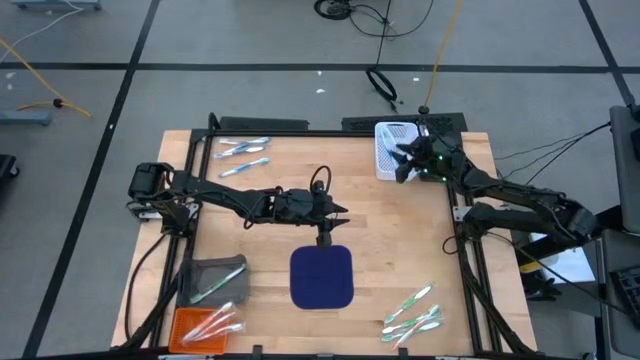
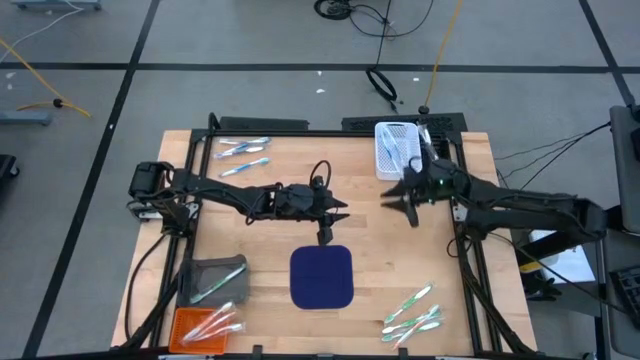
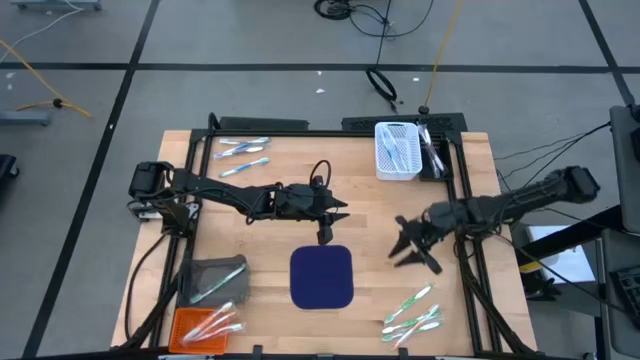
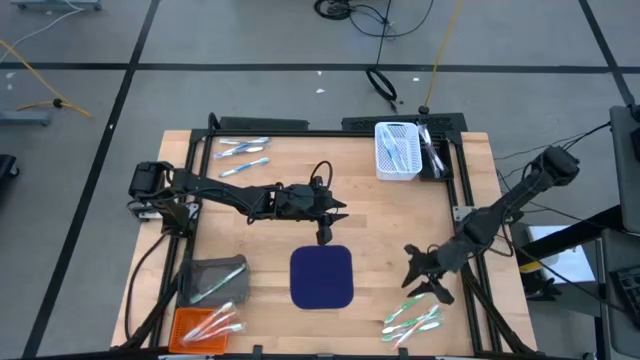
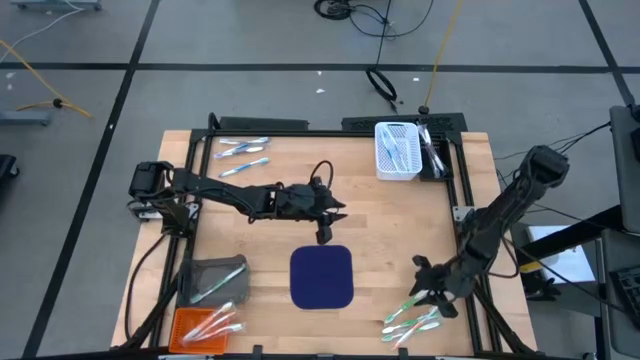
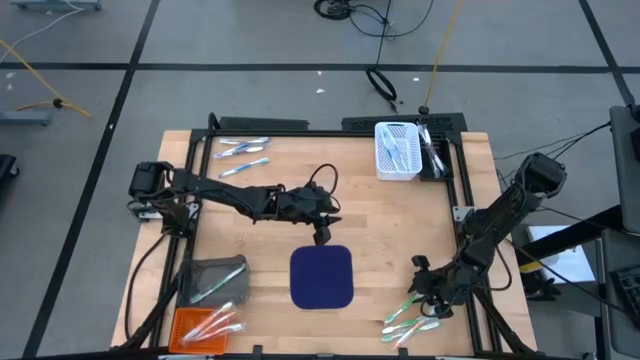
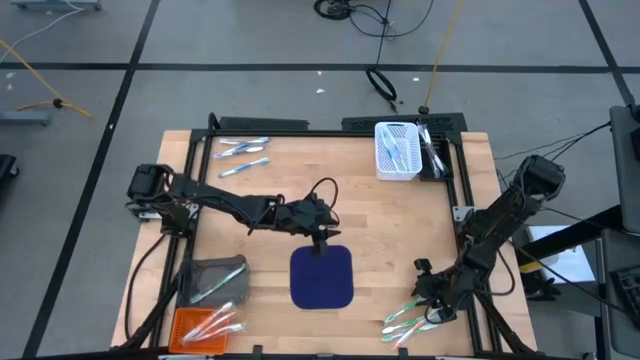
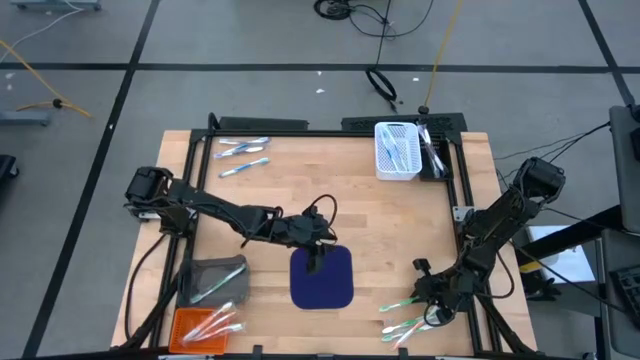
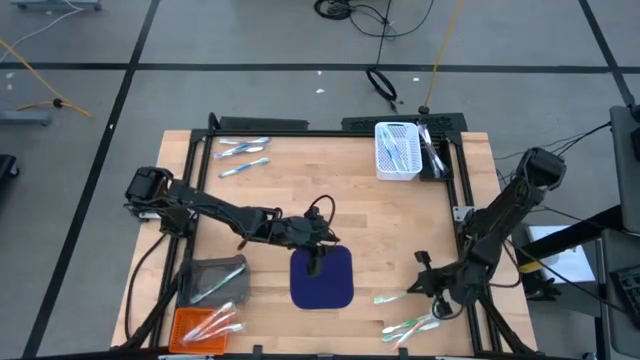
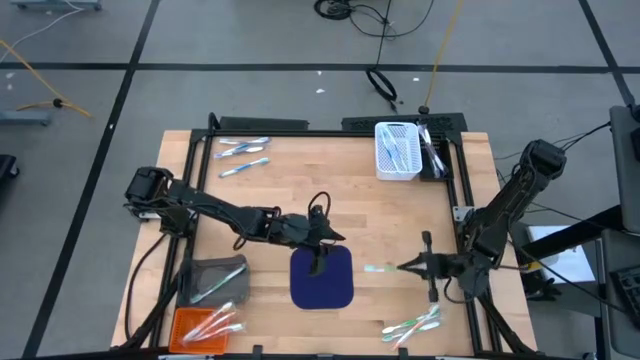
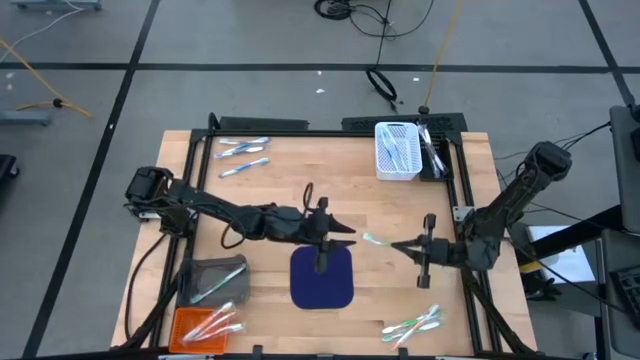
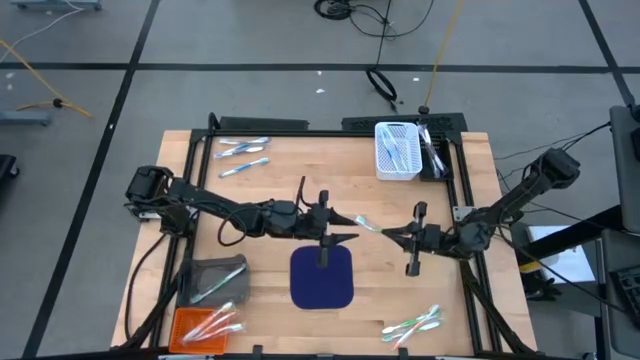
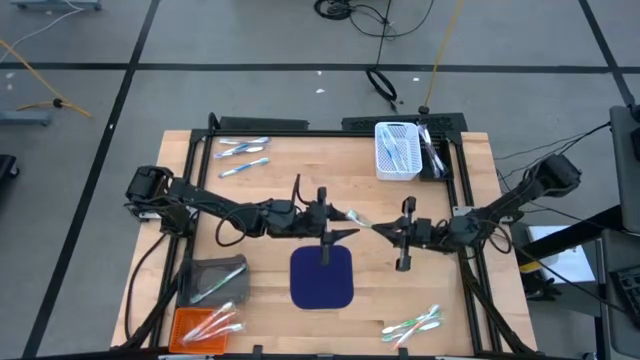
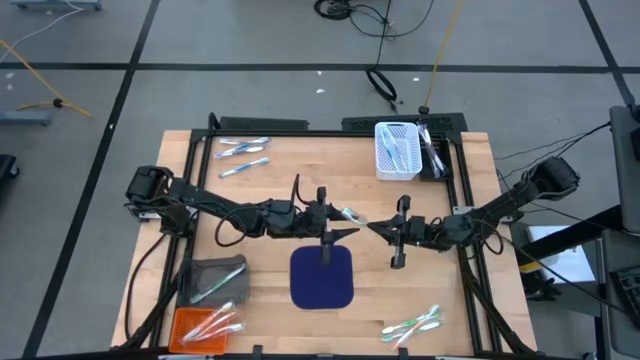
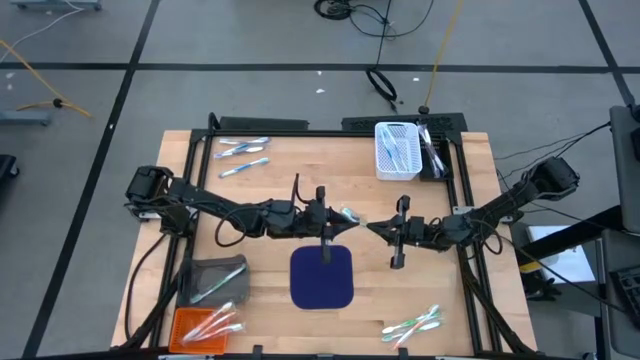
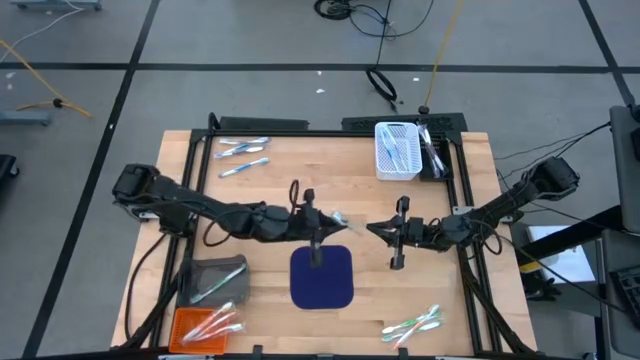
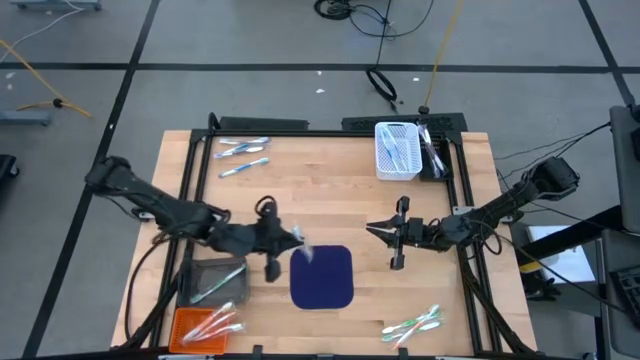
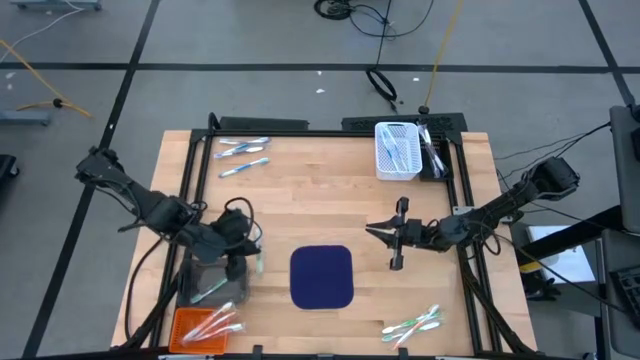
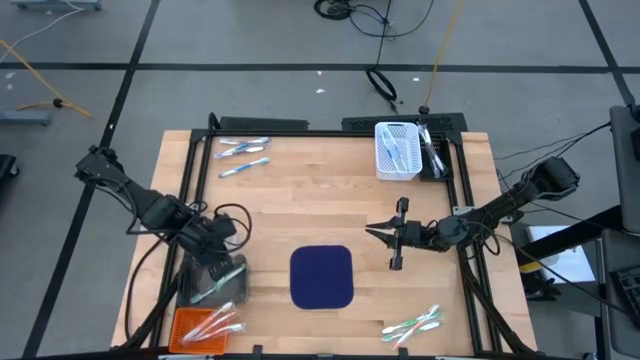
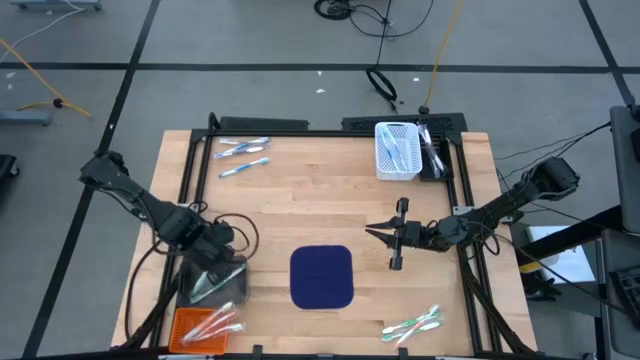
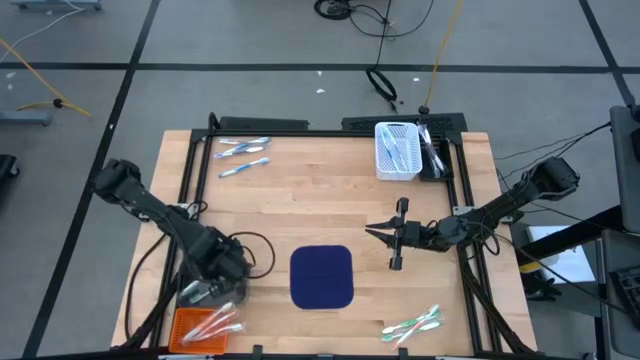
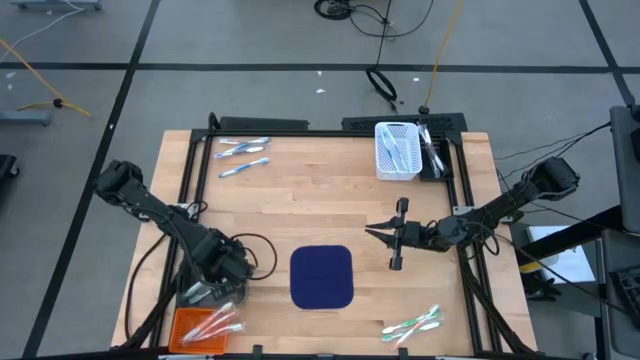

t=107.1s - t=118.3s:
Task: Pick & Place Toothbrushes
Put the green toothbrush into the black bin

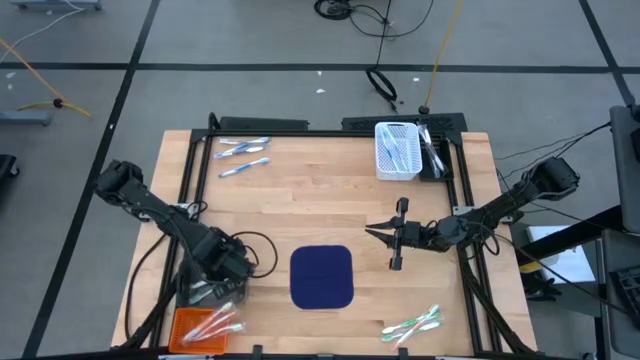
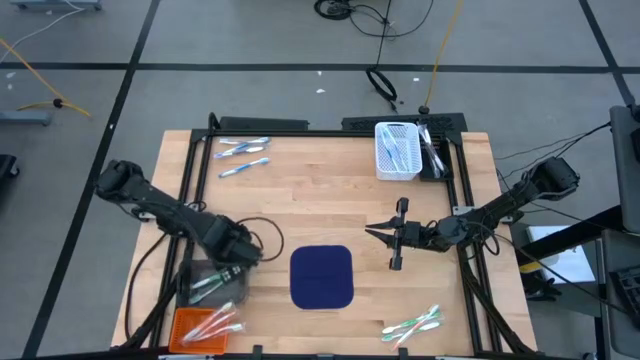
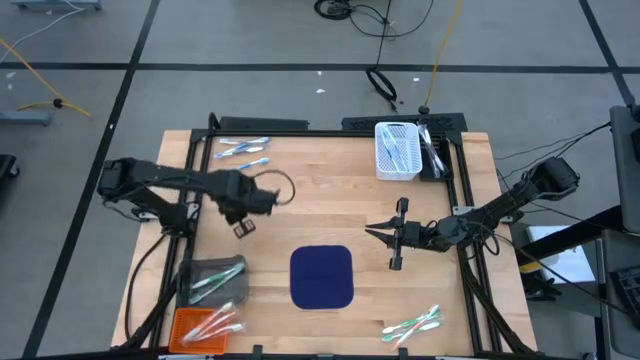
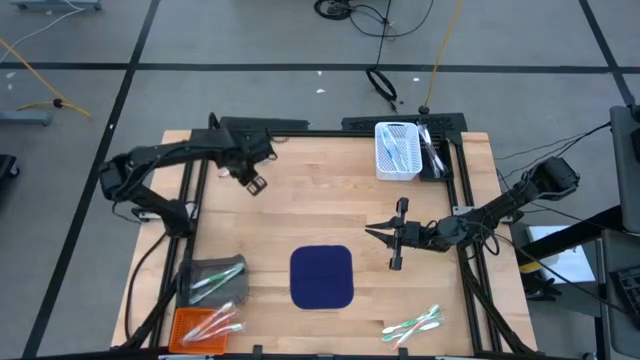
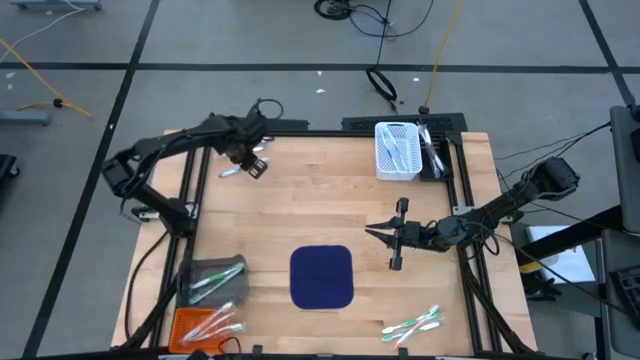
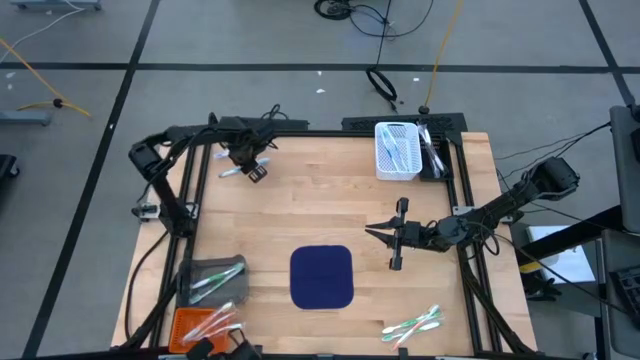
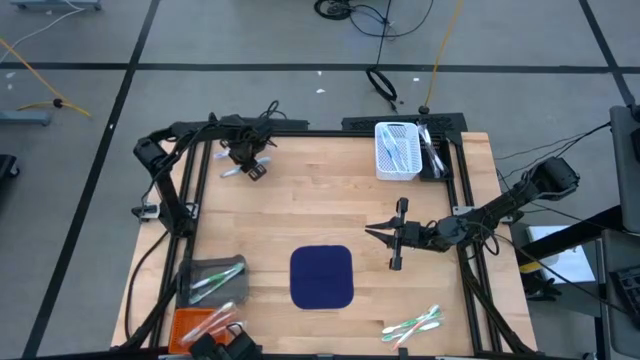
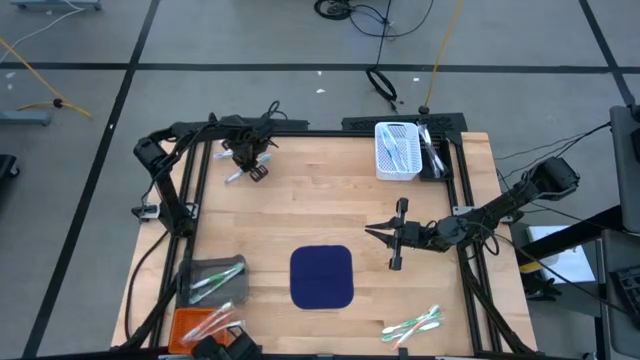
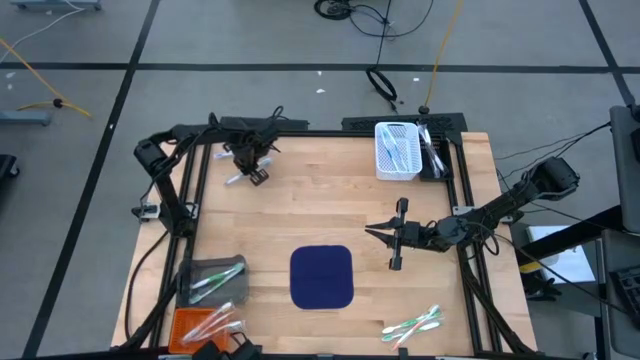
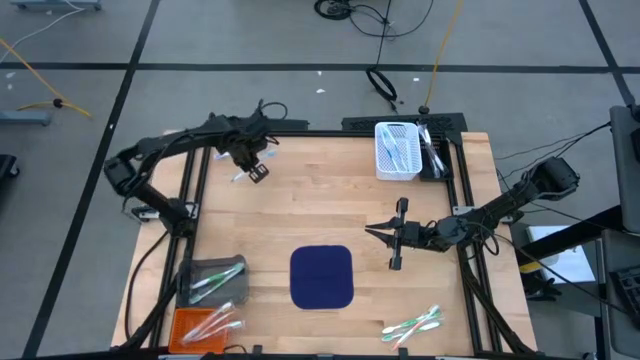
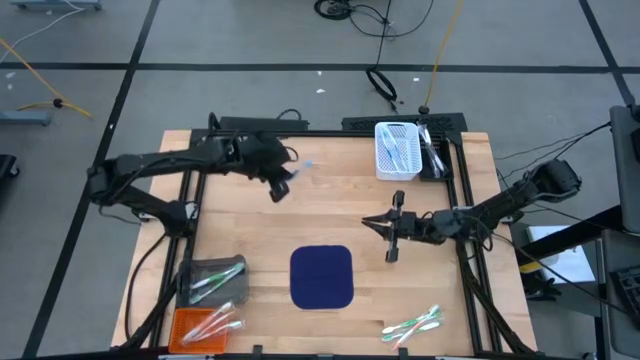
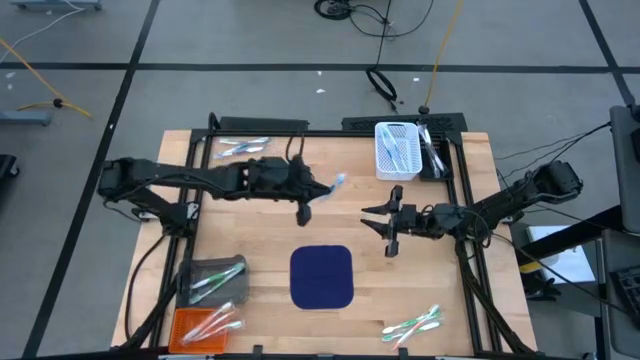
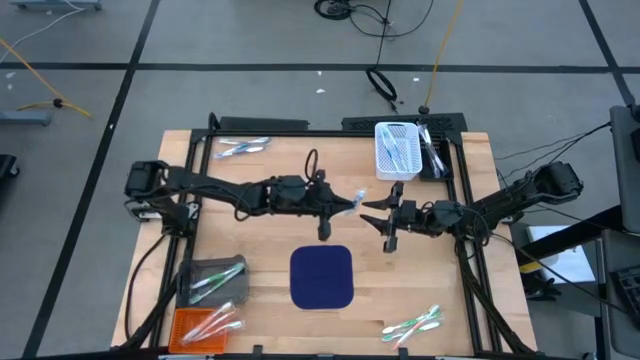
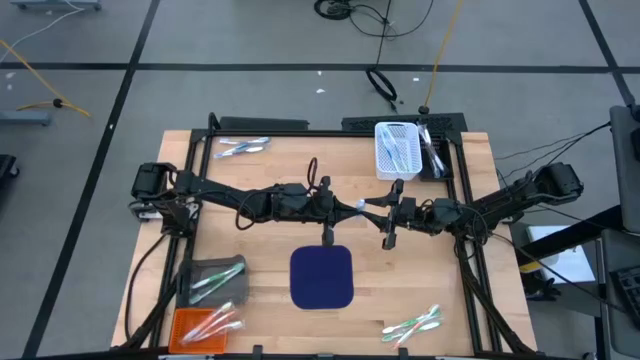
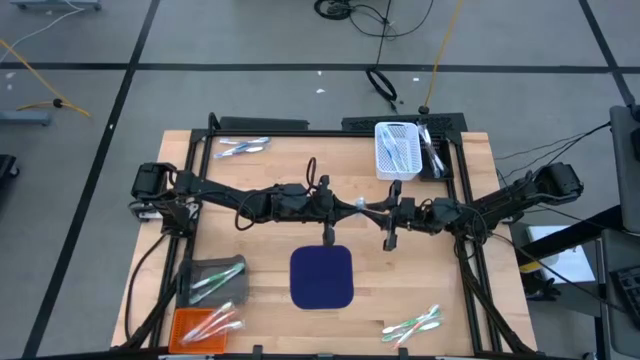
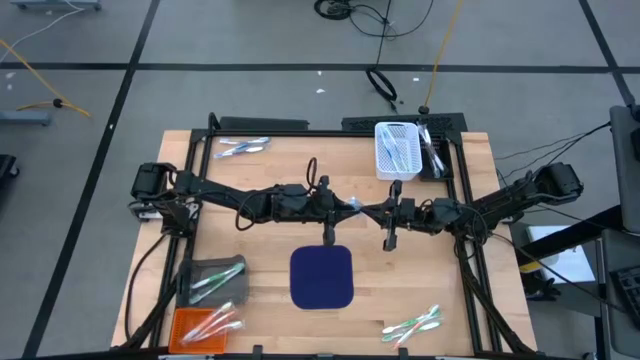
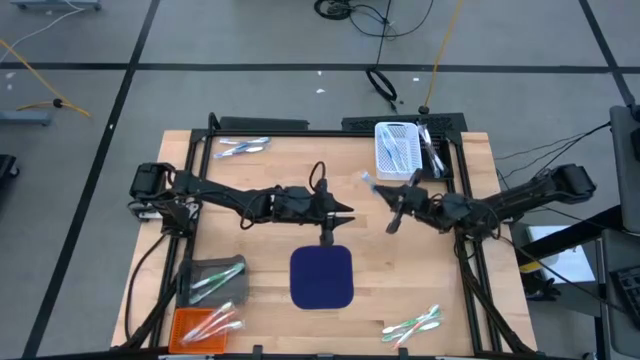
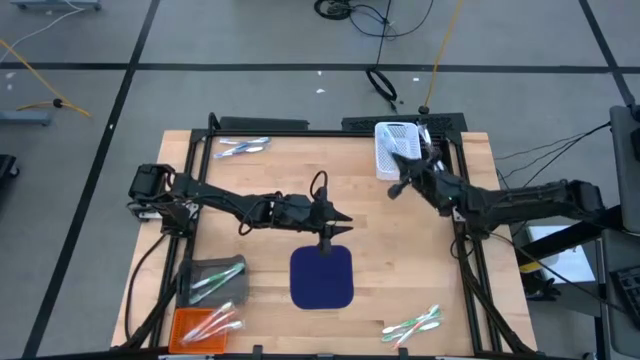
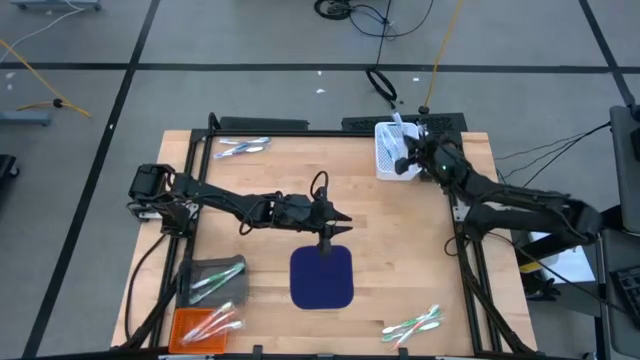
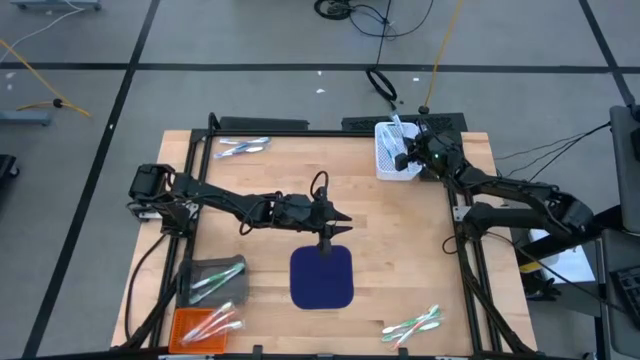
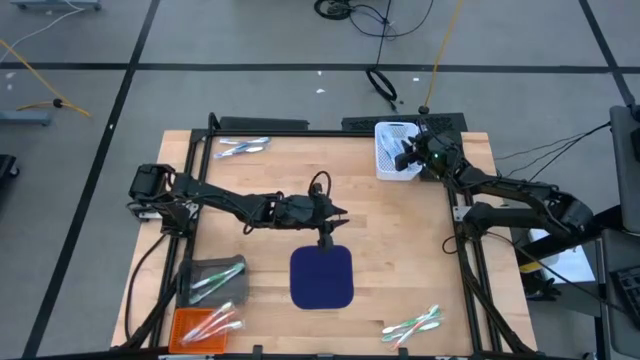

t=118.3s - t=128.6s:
Put the blue toothbrush into the white bin
